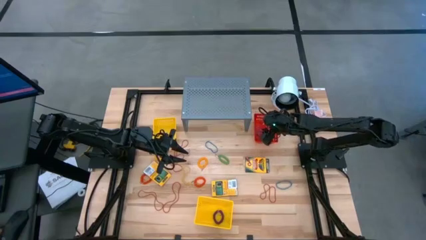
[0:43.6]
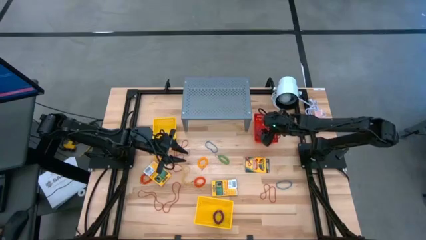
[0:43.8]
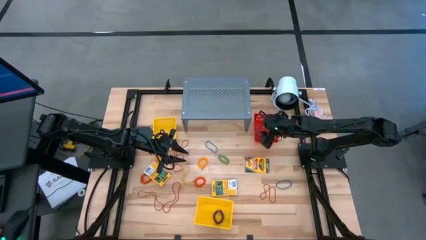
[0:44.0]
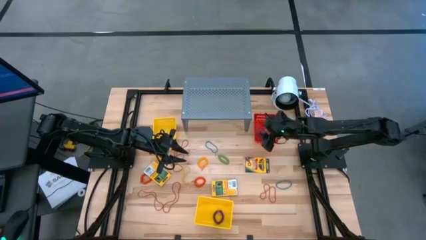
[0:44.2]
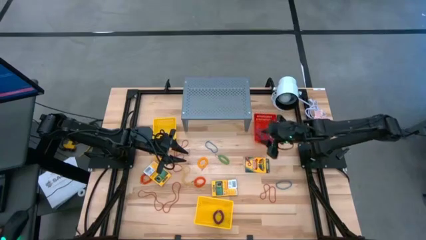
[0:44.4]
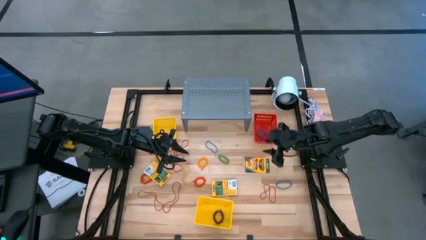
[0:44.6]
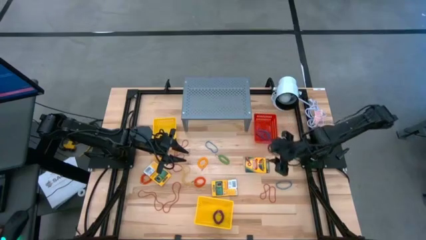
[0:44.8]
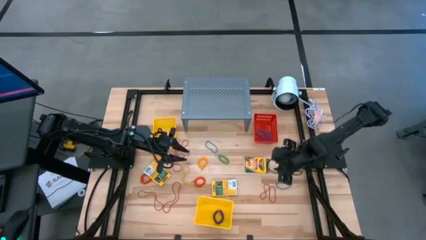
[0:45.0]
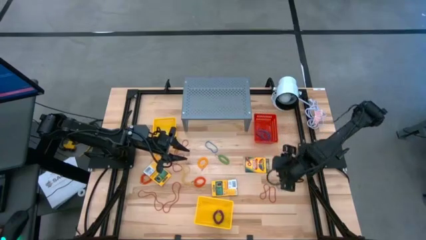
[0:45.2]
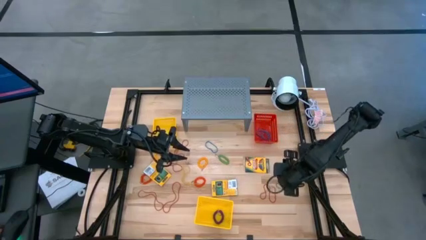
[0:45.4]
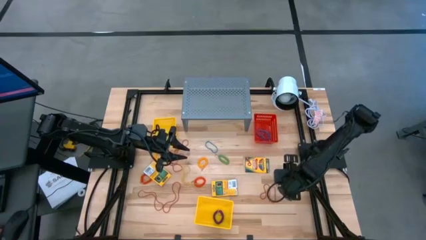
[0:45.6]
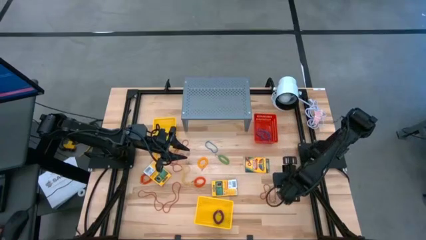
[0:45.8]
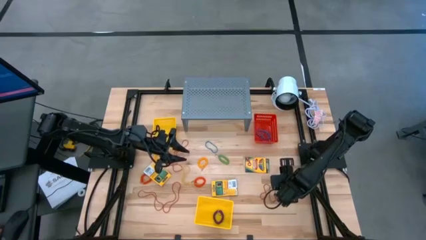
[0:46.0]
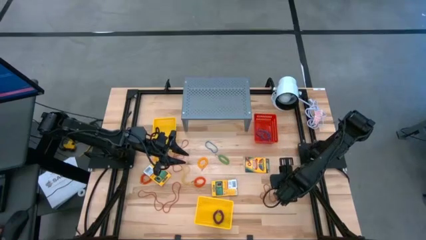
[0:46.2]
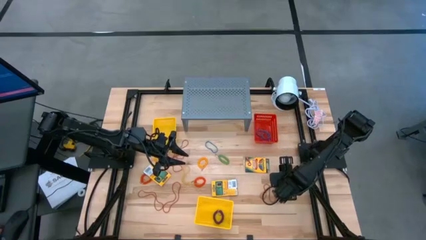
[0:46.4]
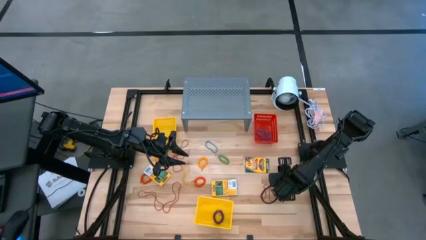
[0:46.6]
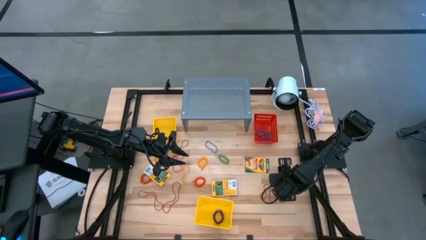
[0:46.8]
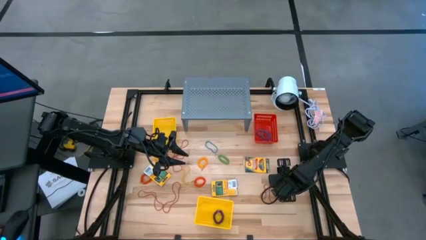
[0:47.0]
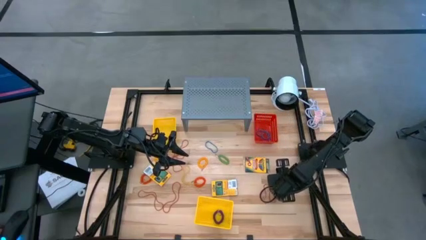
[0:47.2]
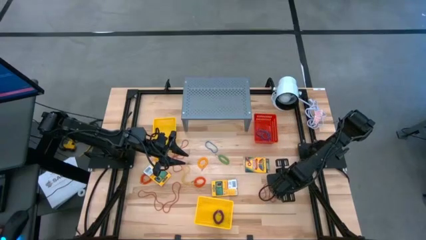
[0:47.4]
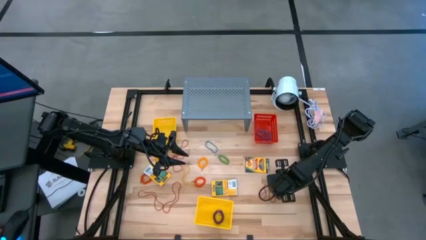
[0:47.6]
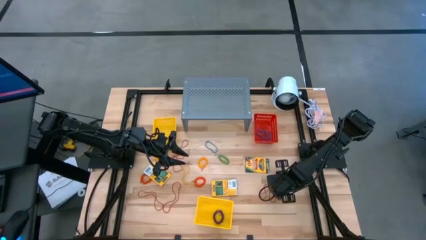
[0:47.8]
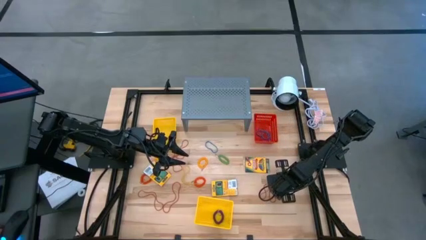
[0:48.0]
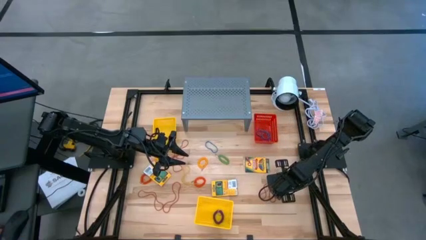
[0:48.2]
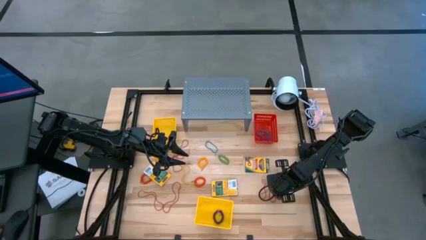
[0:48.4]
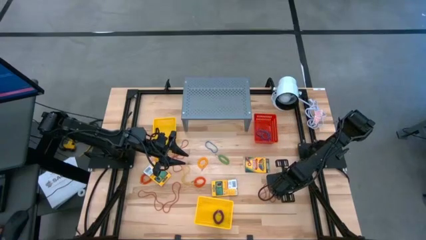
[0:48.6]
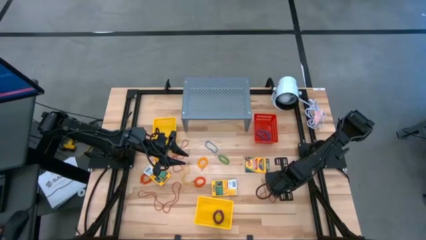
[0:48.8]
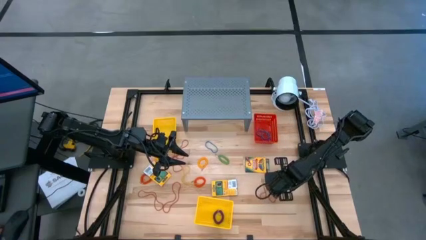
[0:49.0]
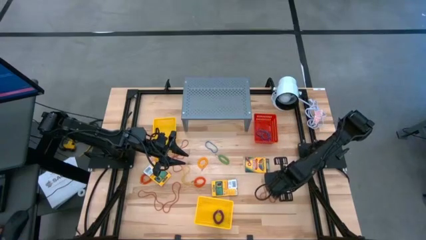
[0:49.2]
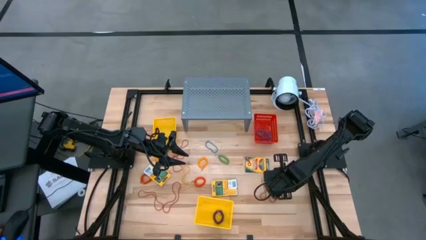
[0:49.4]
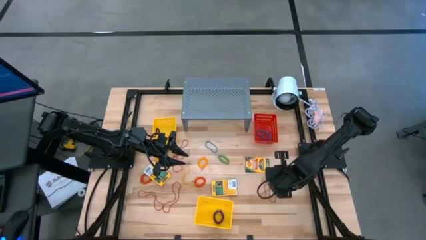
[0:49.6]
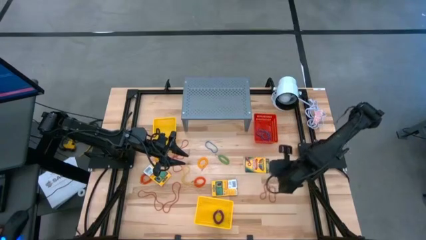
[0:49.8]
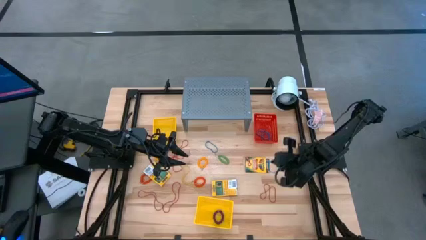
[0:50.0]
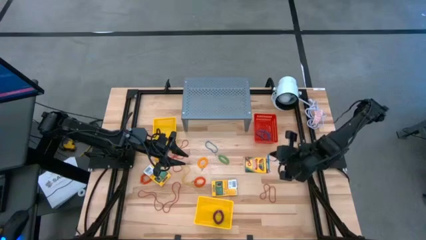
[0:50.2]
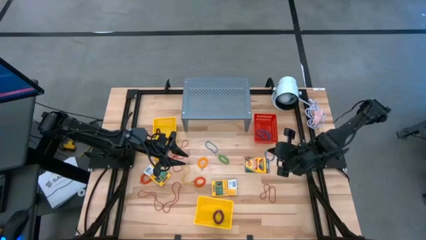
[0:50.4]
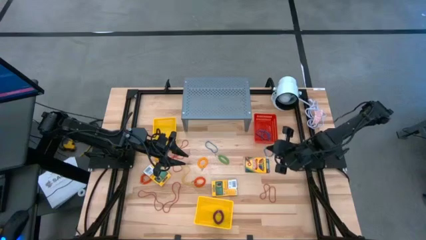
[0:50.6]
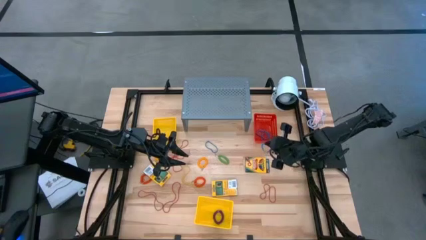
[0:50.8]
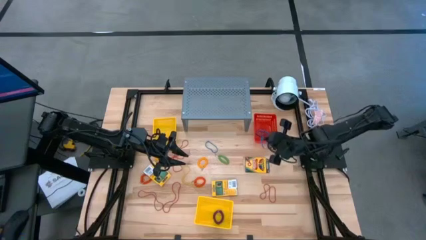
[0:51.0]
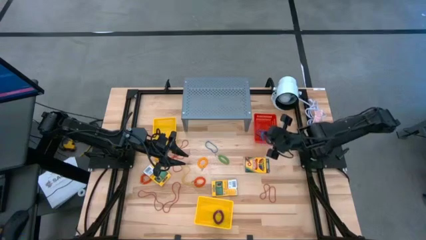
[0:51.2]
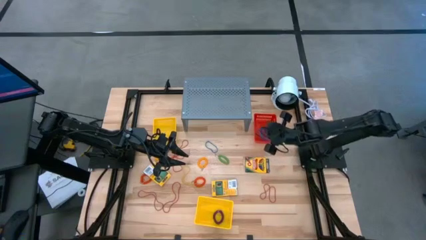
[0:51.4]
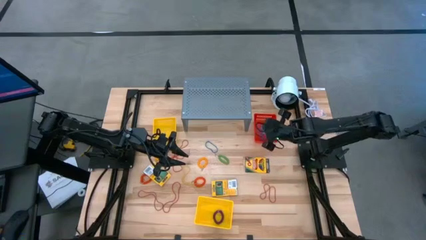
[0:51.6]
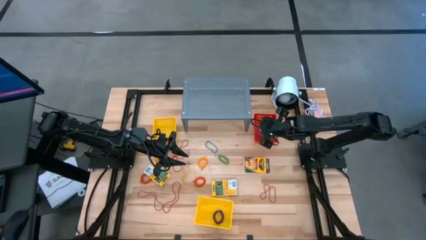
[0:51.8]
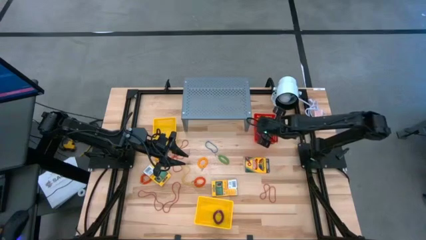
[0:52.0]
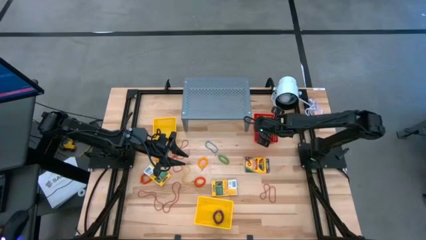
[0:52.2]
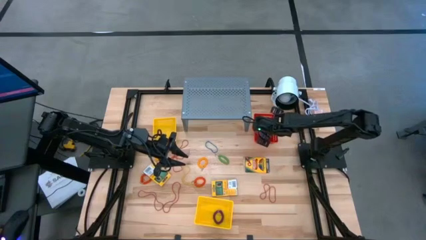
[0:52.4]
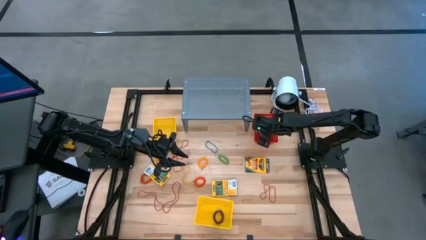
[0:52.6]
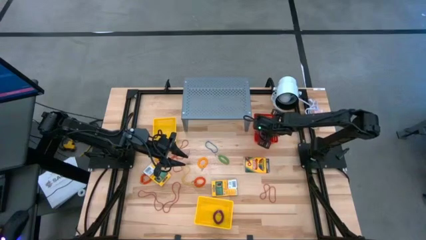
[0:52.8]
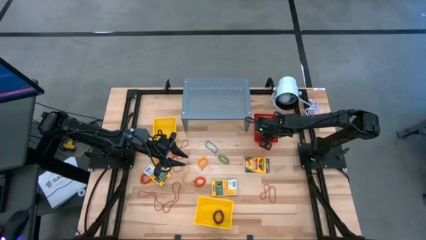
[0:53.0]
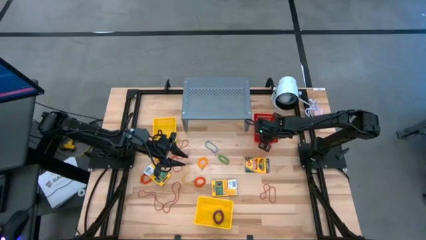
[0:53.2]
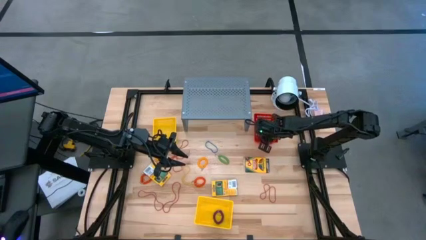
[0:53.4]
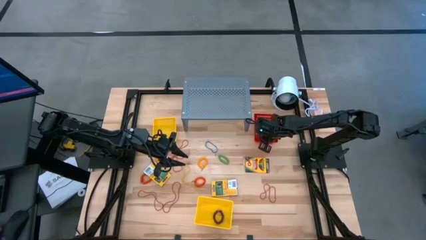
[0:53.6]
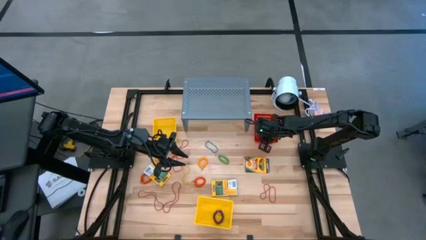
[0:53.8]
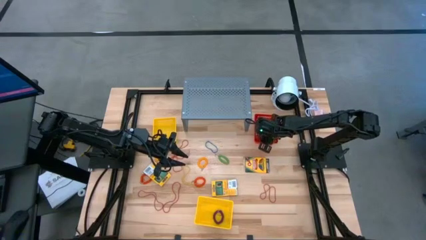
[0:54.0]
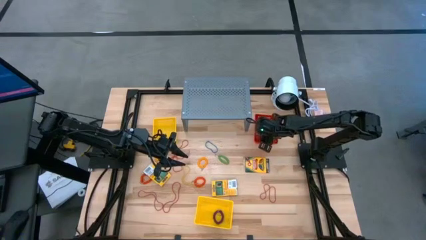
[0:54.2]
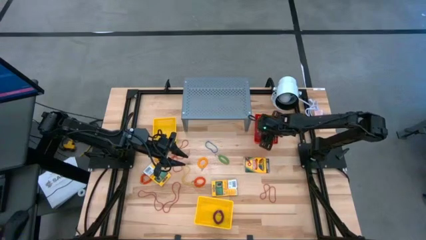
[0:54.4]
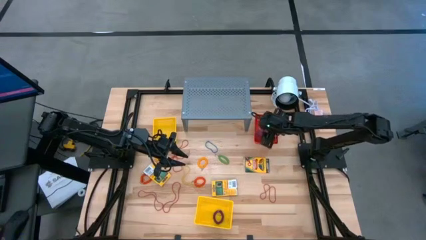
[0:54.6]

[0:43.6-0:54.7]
Task: Pick & Place Office Desk Supplies
Put the blue rubber band into the red bin
